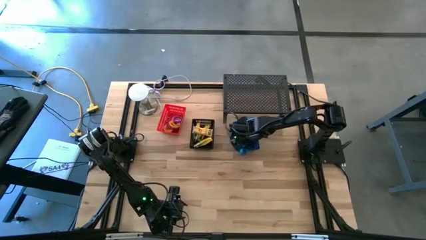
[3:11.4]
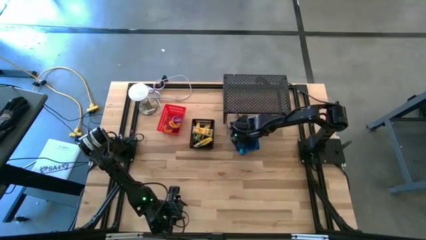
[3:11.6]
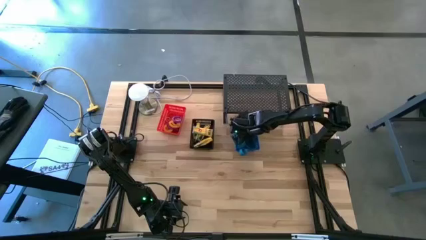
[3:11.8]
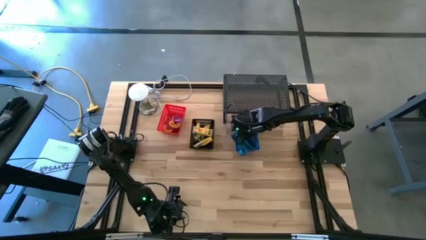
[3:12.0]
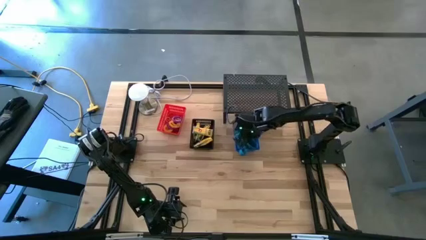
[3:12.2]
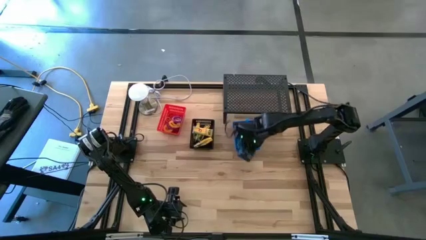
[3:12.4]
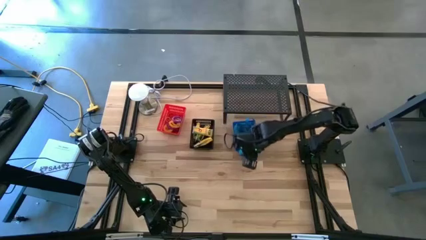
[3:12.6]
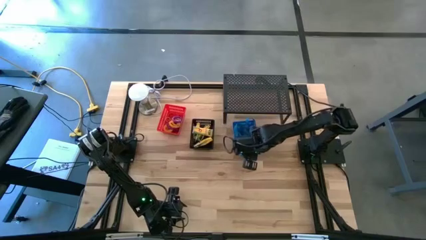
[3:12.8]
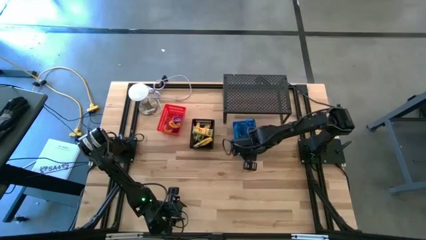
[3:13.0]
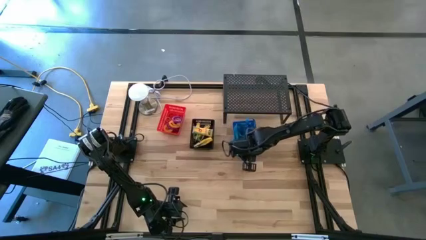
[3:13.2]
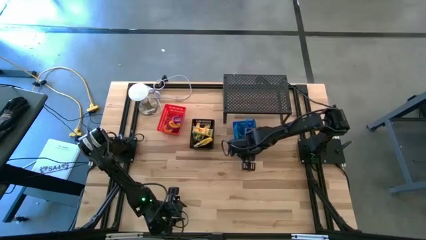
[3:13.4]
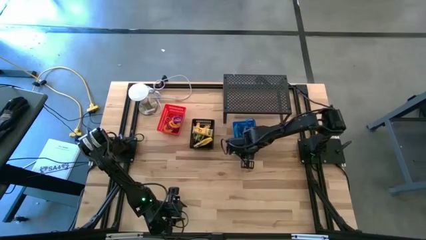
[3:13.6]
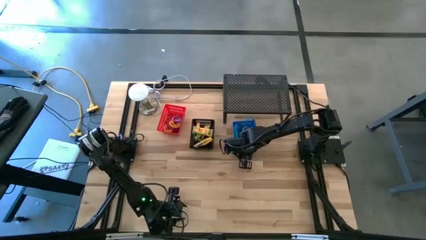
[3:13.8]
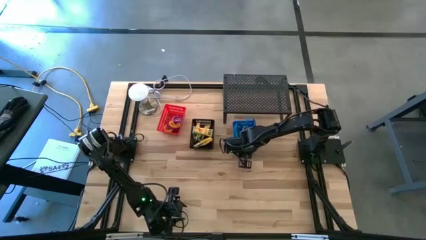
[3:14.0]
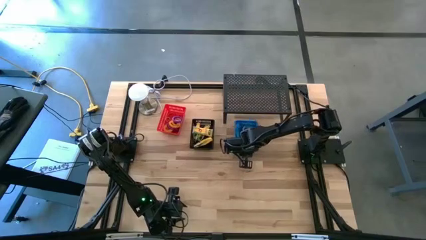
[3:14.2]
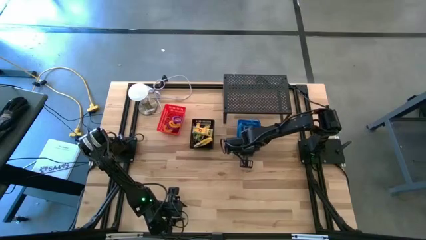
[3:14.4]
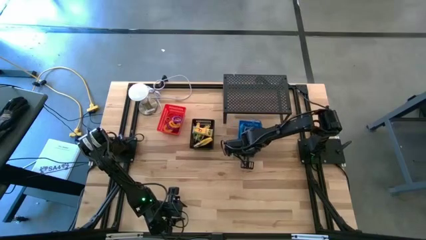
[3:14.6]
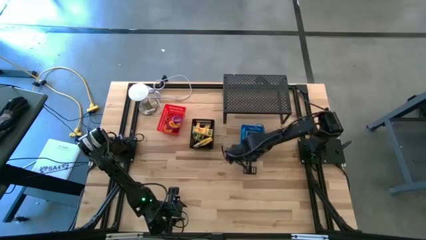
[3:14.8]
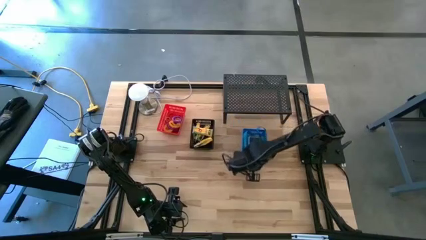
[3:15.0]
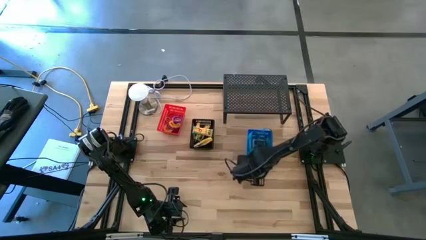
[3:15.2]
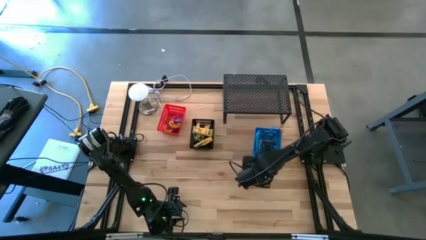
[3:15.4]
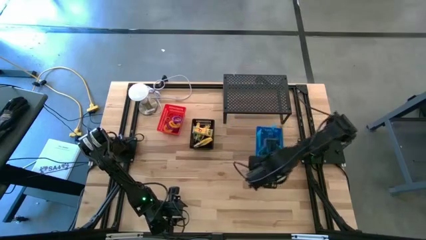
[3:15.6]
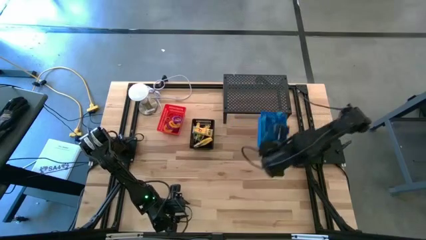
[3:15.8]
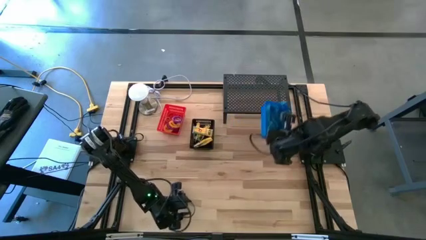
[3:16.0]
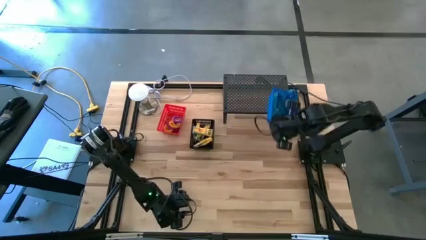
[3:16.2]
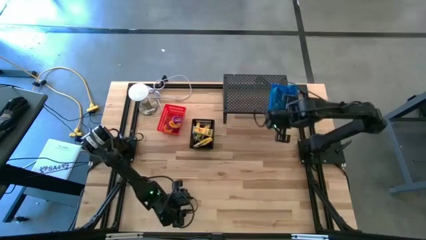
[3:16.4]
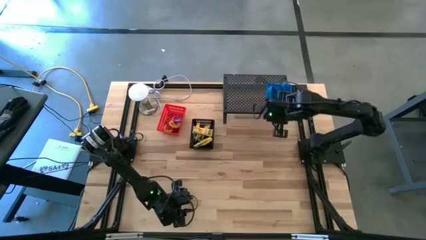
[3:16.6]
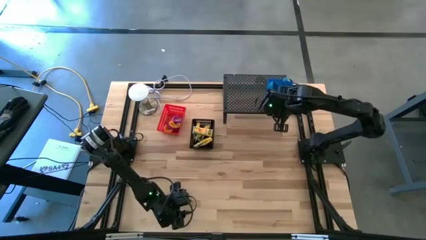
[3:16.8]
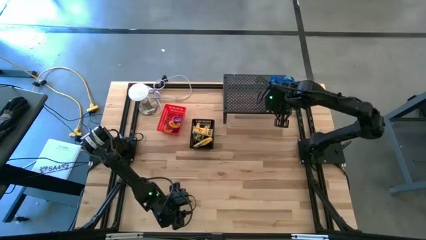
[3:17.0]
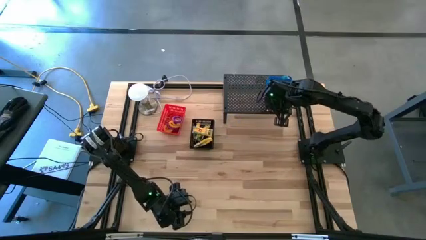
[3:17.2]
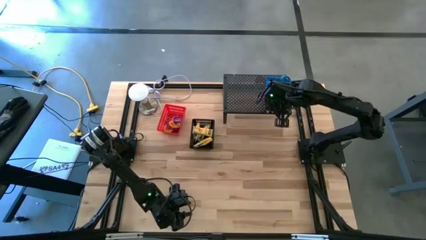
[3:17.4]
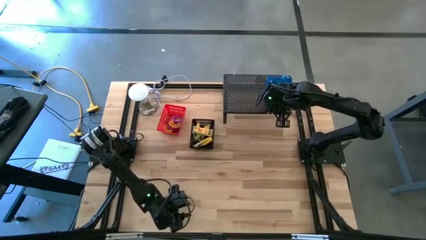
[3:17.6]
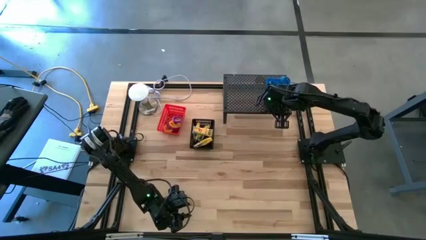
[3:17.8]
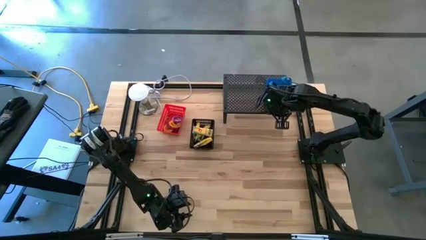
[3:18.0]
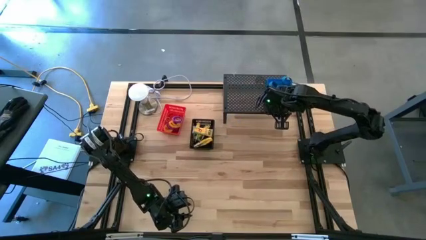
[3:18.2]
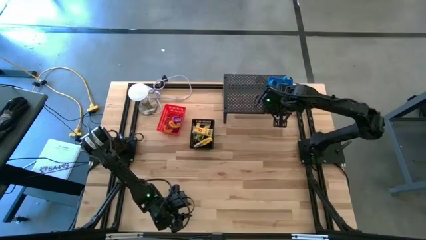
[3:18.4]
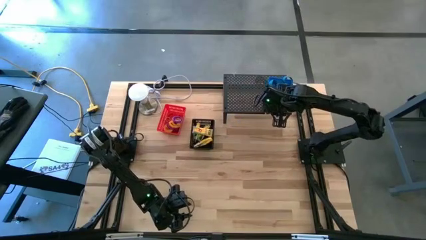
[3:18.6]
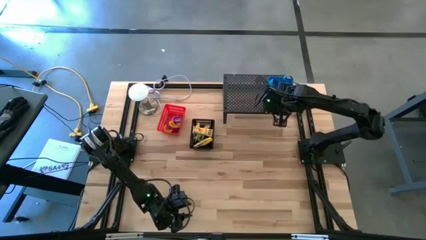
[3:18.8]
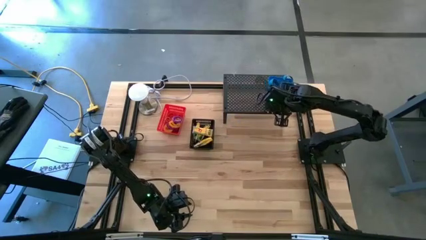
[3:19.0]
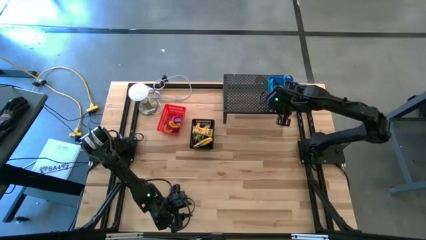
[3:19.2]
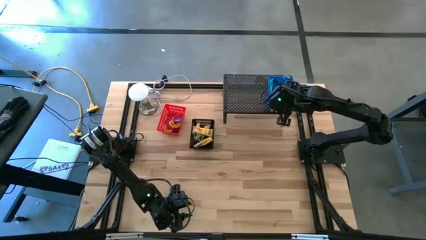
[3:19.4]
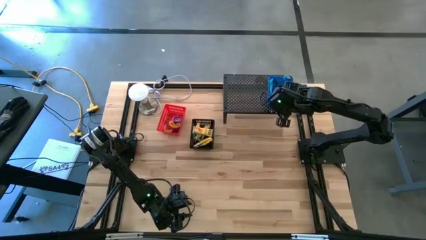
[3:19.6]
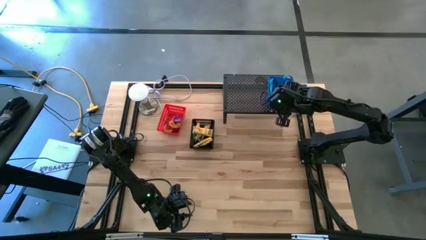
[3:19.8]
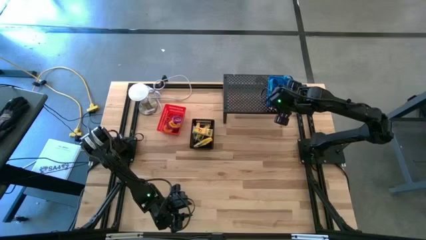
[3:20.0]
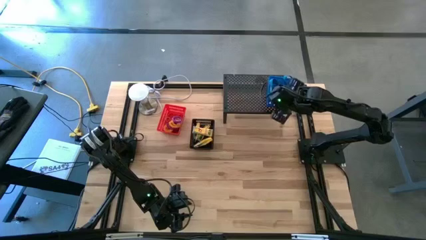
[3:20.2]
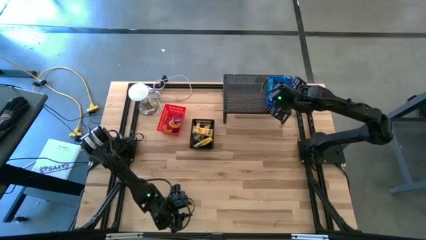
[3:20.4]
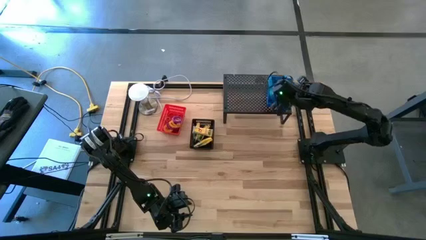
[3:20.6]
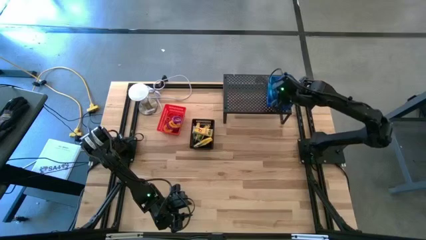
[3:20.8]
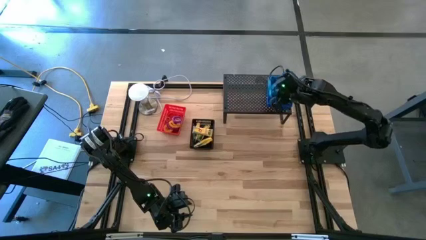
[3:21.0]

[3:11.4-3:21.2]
Task: Pick & Place Office Desk Supplies
Put the blue bin on the shelf

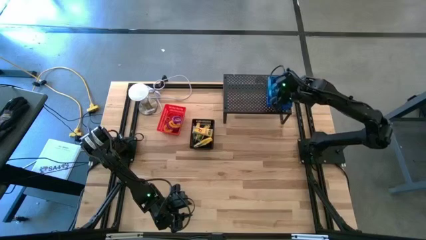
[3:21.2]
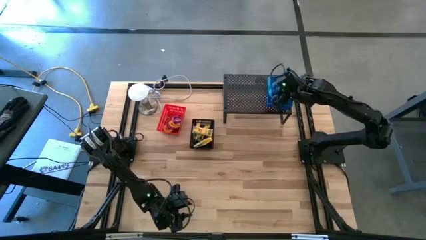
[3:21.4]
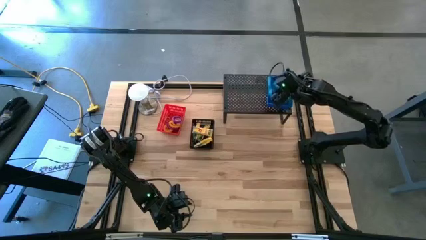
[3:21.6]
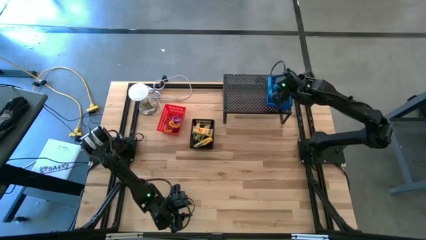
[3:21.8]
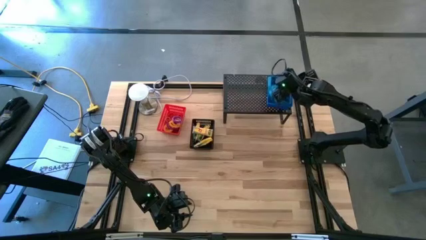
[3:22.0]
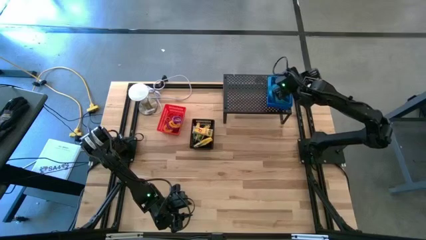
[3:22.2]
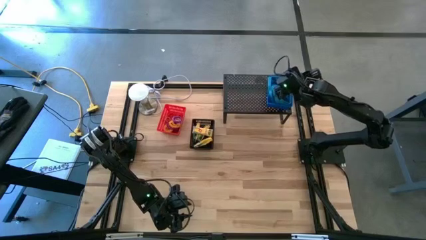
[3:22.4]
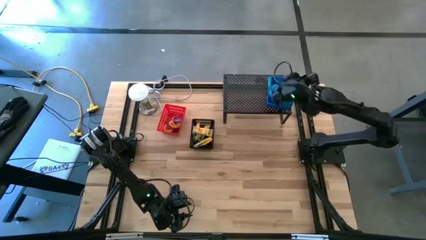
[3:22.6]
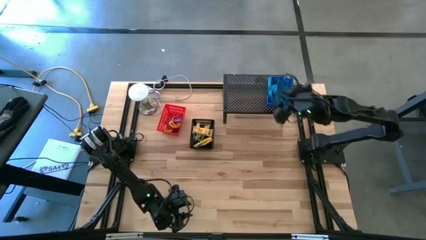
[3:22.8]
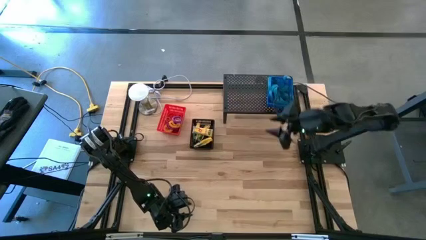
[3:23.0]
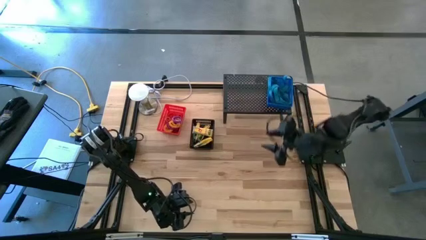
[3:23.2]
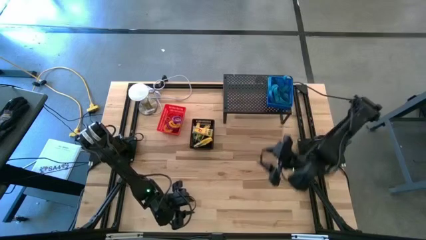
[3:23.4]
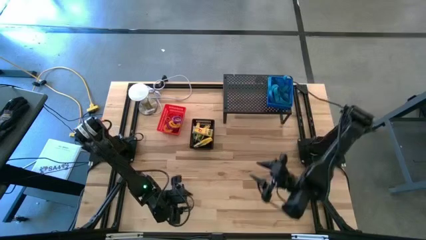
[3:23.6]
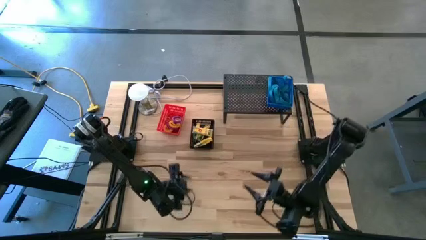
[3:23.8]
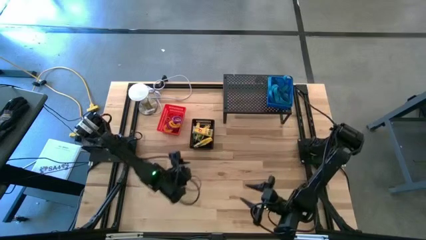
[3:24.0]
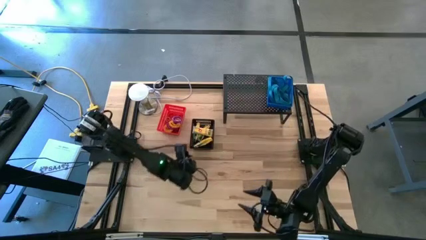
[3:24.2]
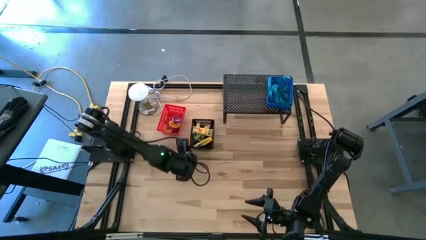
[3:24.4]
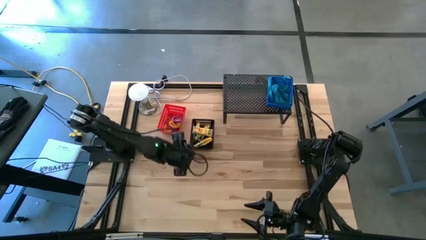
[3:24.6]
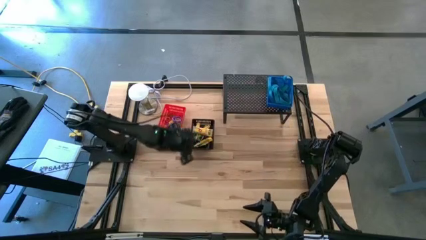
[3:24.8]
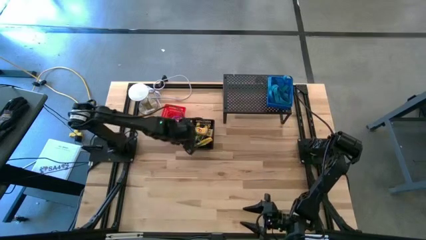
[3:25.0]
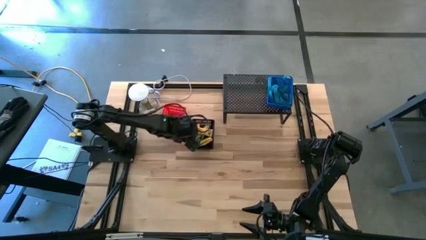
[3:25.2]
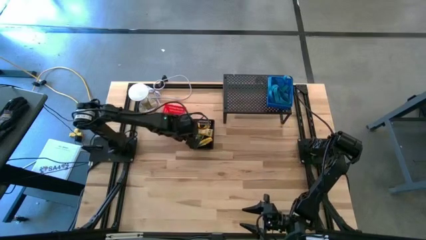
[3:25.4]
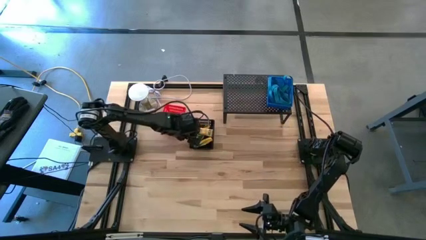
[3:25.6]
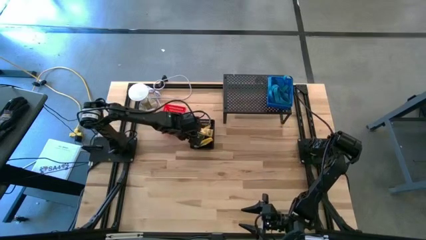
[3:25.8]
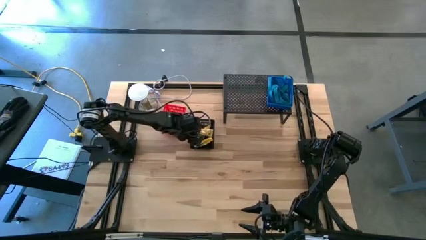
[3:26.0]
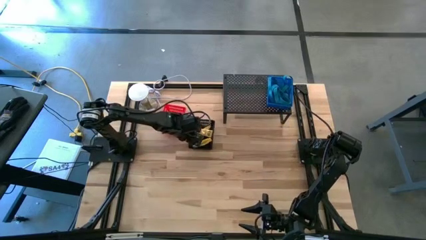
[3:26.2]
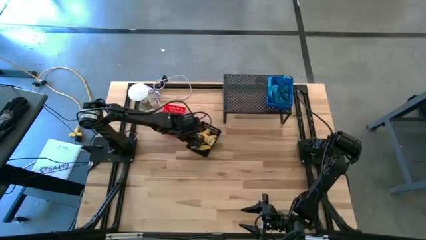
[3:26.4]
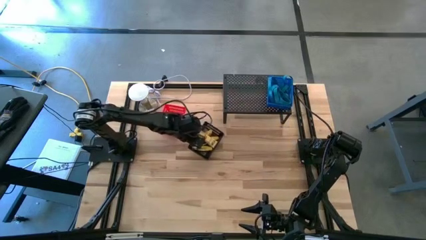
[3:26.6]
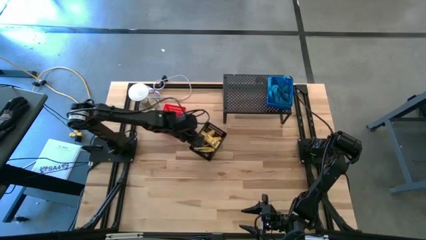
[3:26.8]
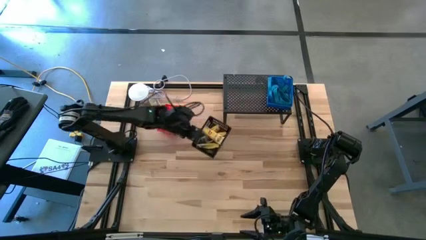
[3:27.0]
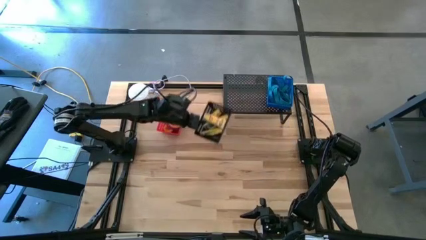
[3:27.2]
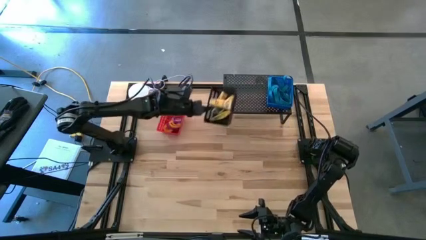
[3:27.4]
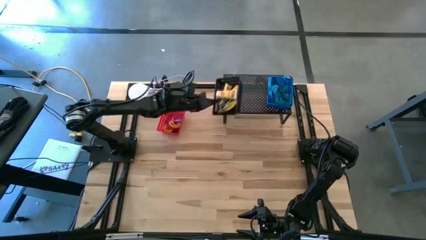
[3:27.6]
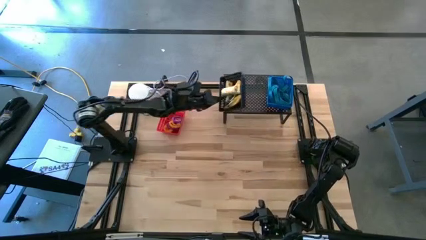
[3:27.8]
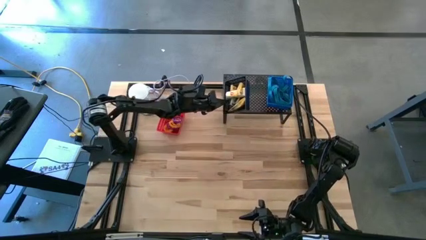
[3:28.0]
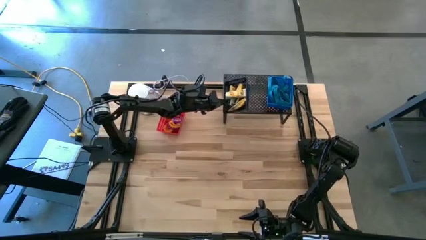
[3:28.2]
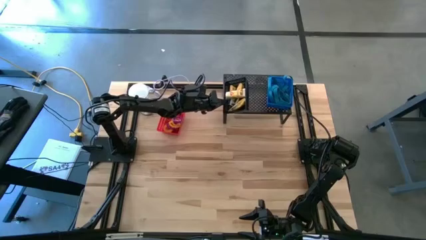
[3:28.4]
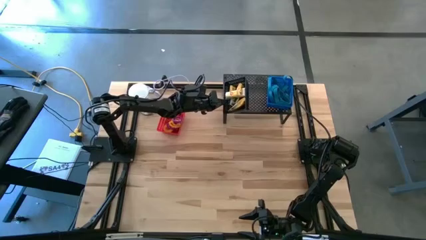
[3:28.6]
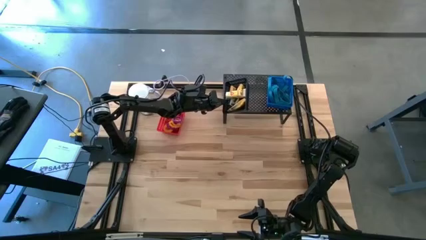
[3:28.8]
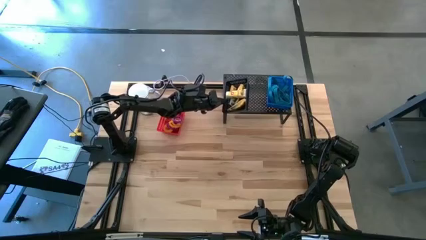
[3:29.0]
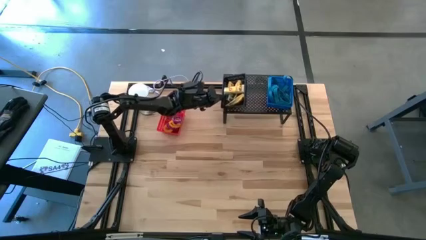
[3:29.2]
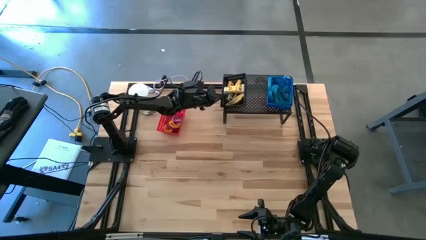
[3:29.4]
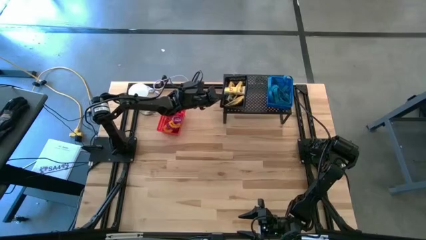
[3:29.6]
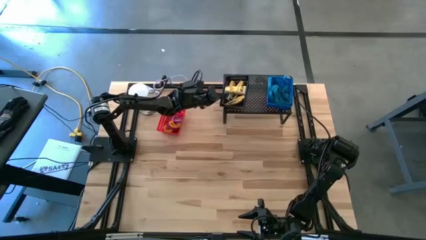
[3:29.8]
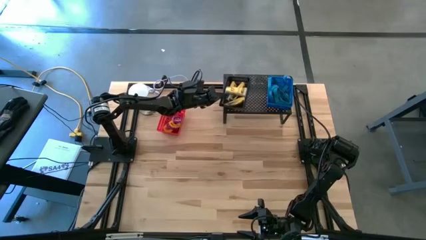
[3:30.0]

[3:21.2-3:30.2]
Put the black bin on the shelf
